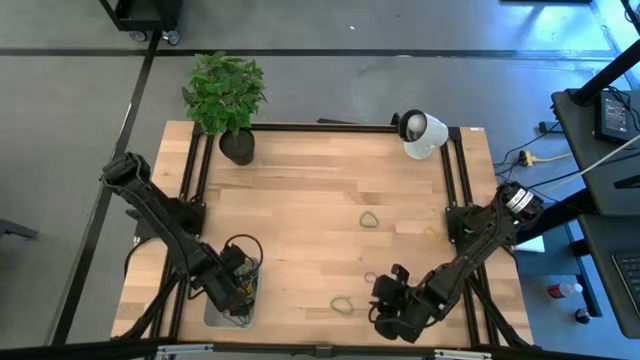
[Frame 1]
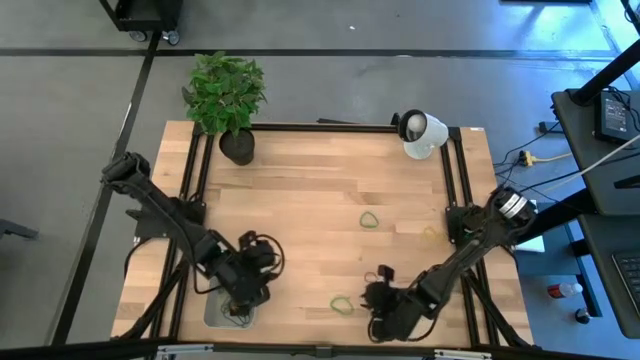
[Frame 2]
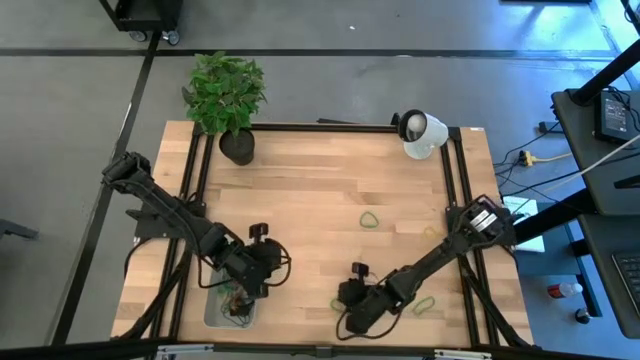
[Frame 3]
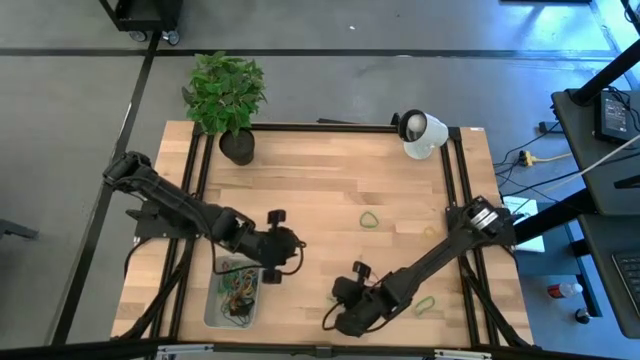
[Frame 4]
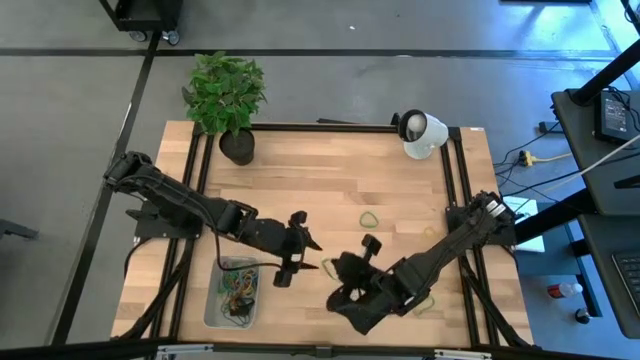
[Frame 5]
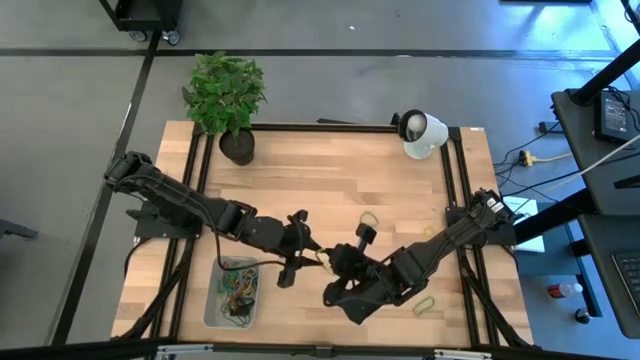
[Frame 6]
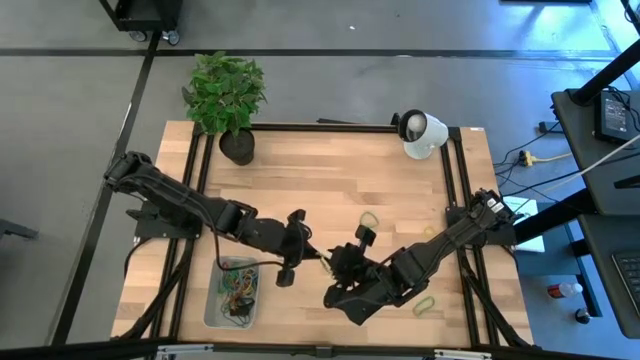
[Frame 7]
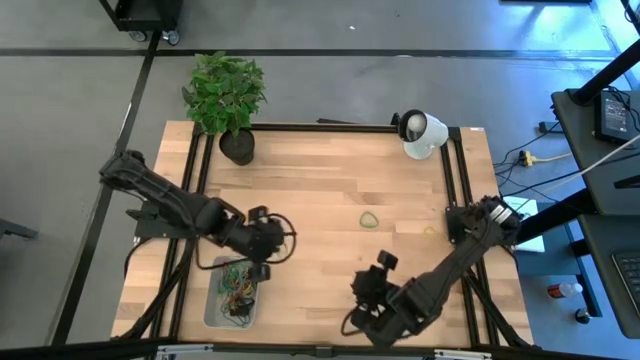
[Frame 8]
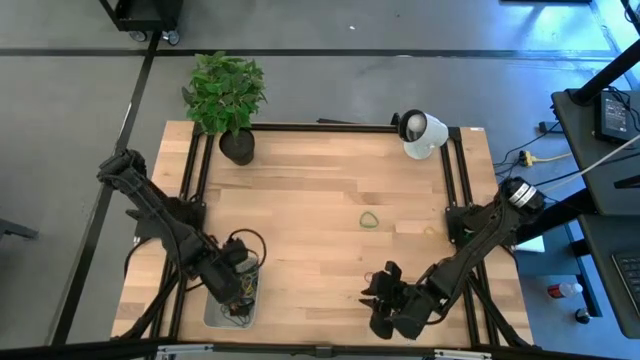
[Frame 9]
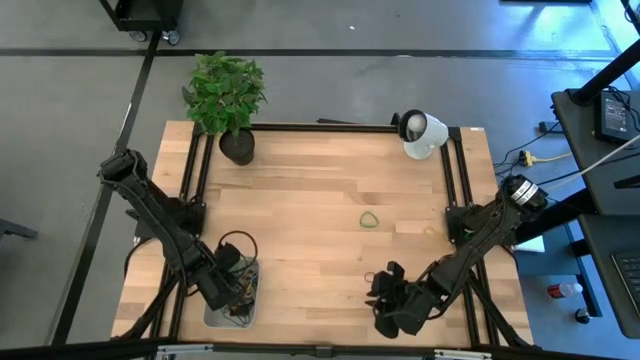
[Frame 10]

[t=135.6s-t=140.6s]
Task: Pick and place rubber bands into bin
Put the green rubber band into the bin

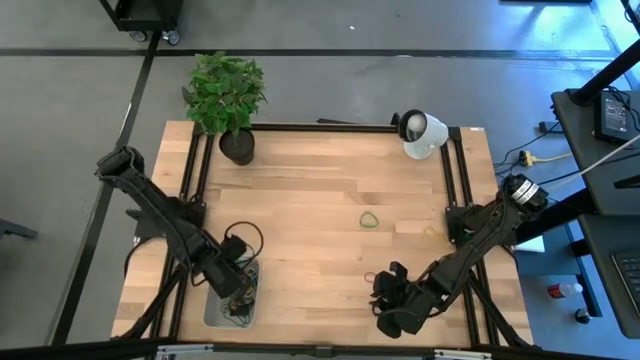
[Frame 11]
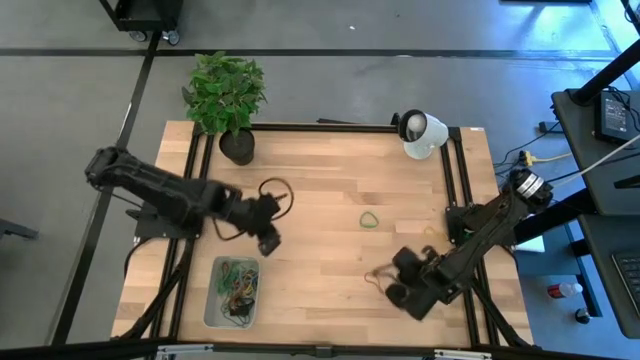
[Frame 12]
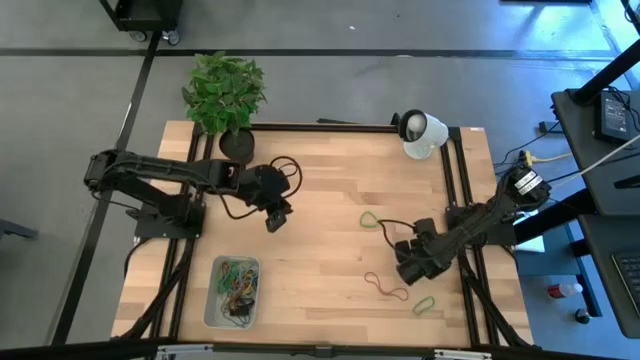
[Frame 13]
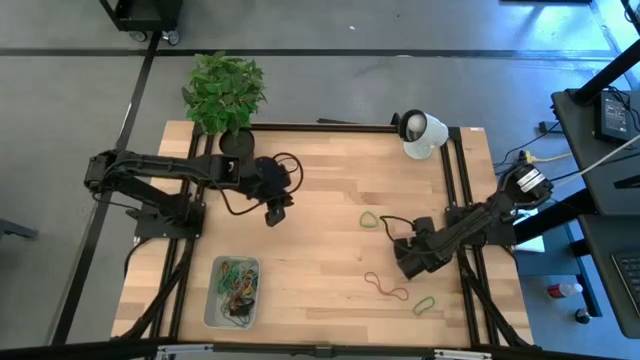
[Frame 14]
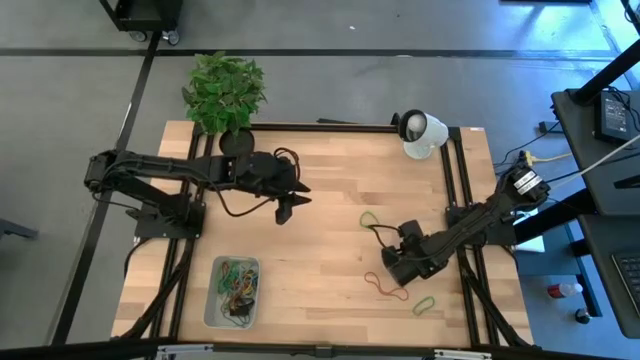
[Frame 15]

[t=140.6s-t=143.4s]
Put the yellow rubber band into the bin

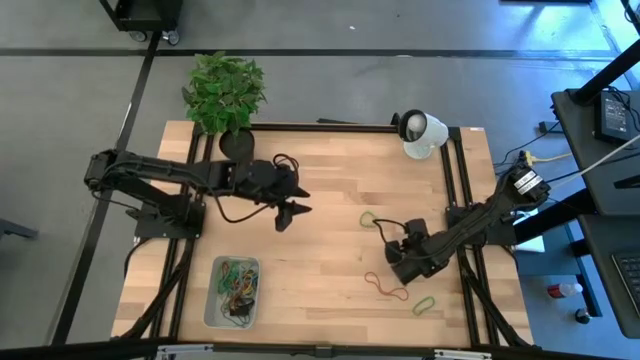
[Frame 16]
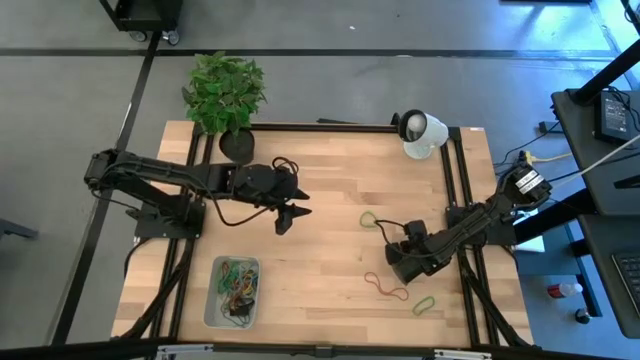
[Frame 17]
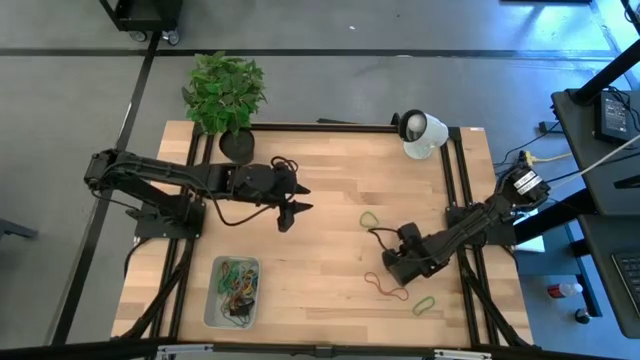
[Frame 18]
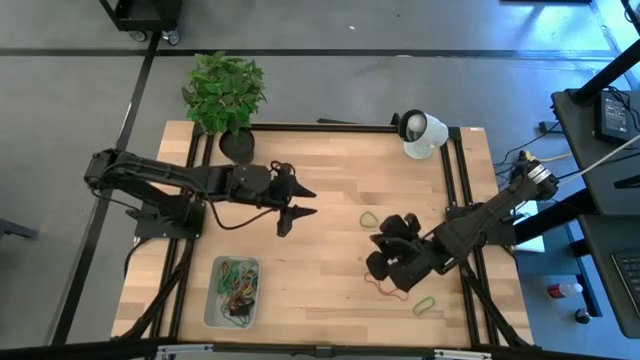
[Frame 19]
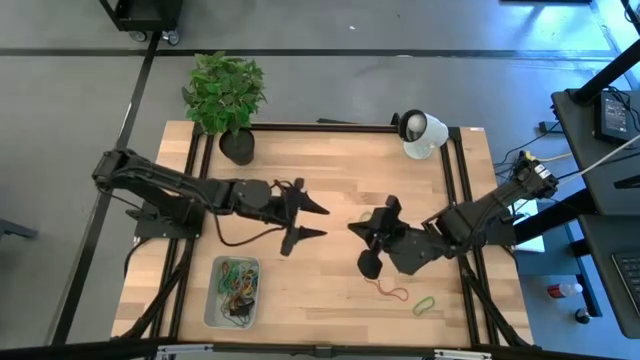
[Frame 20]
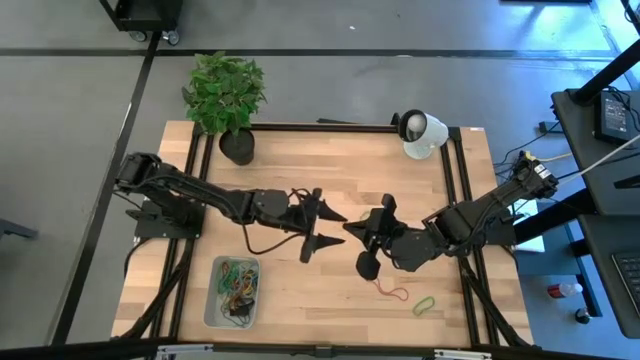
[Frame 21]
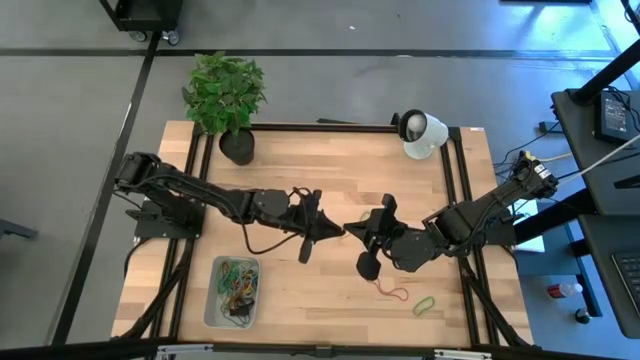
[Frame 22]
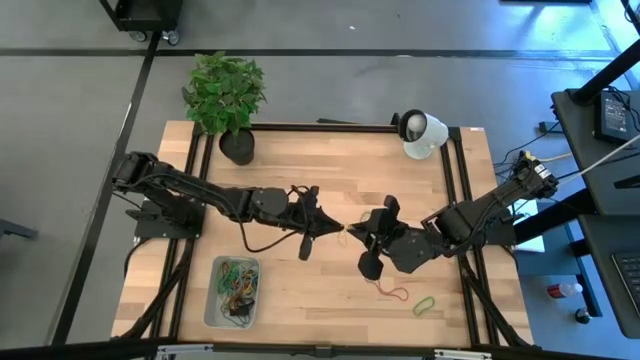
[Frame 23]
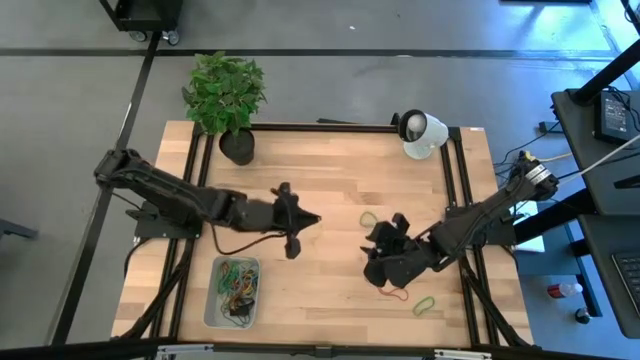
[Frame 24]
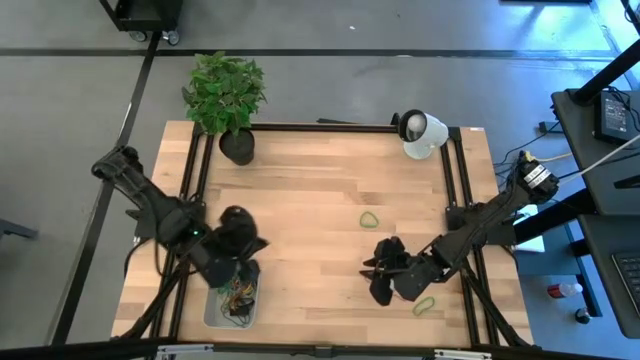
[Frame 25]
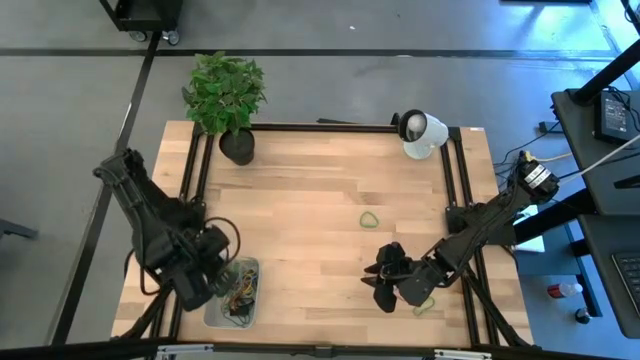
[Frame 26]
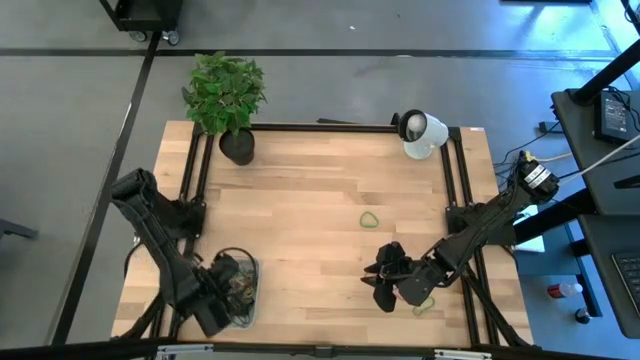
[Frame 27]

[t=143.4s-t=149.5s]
Put the yellow rubber band into the bin

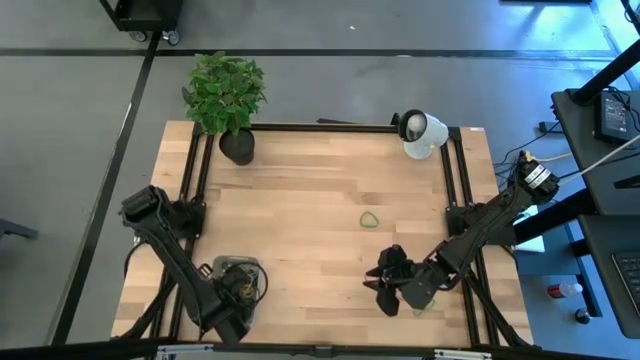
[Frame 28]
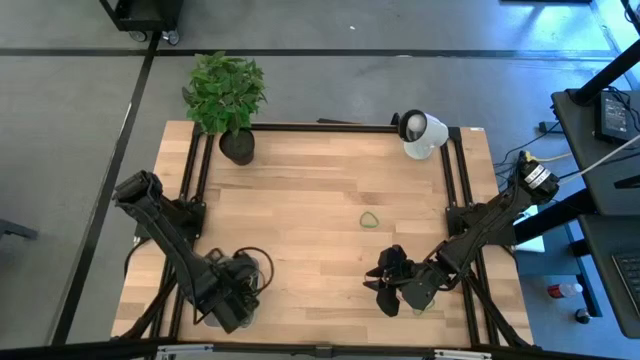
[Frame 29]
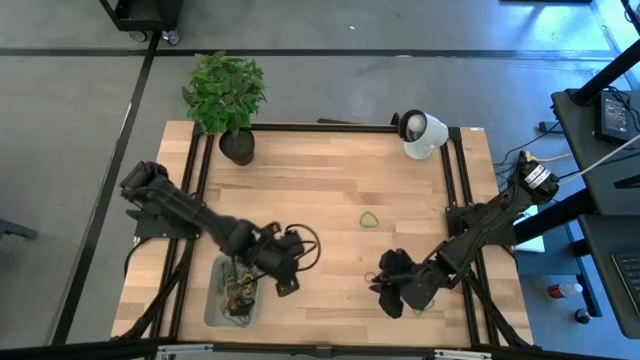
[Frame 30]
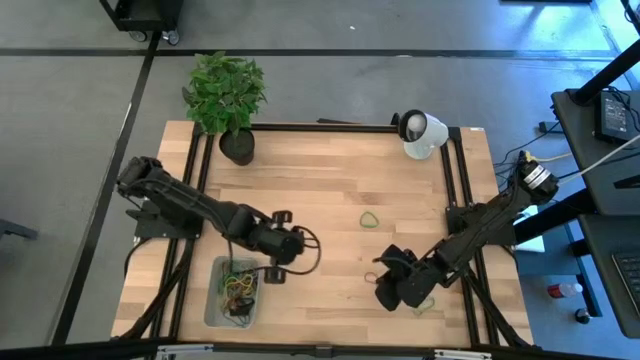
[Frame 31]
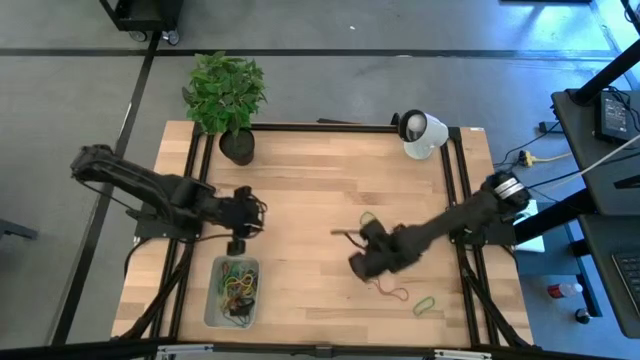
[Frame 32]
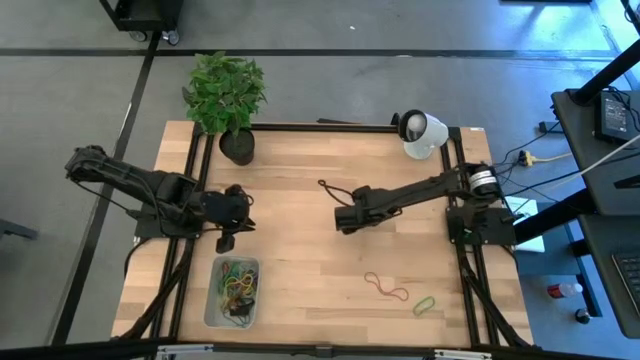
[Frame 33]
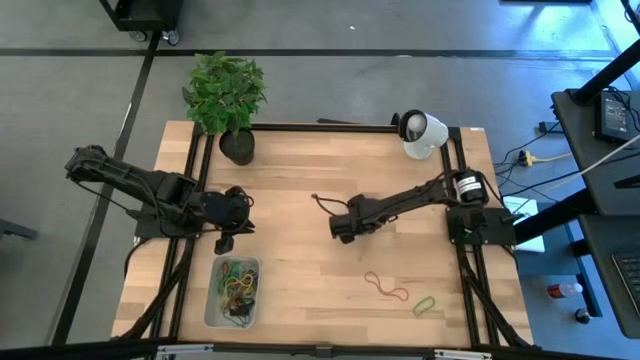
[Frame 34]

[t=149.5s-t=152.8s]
Put the green rubber band into the bin

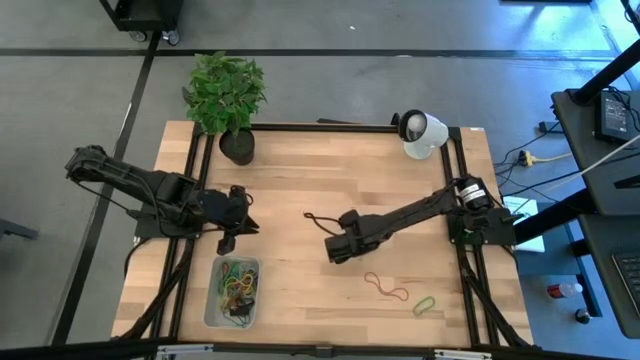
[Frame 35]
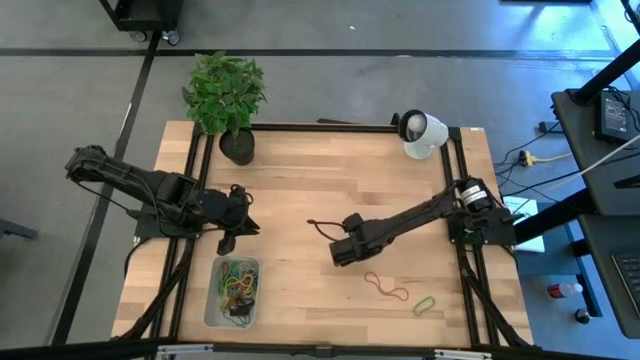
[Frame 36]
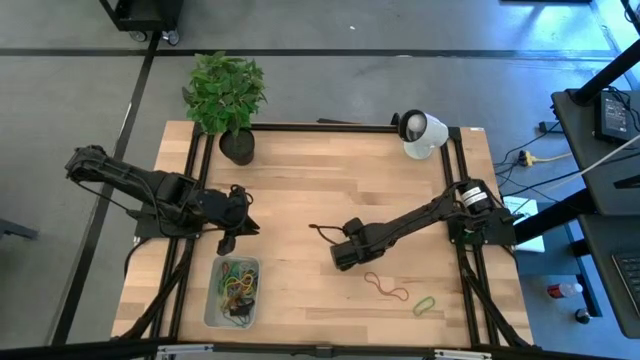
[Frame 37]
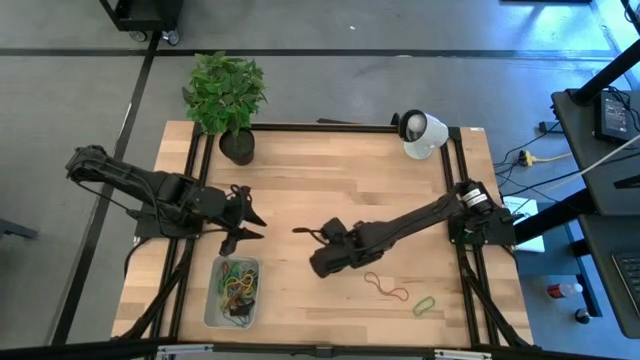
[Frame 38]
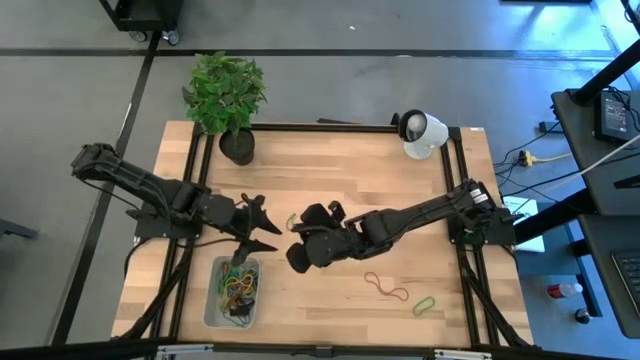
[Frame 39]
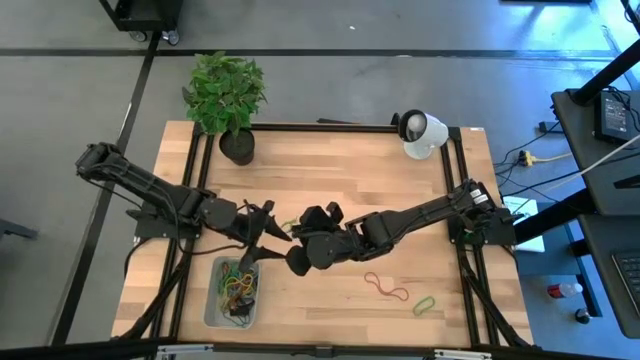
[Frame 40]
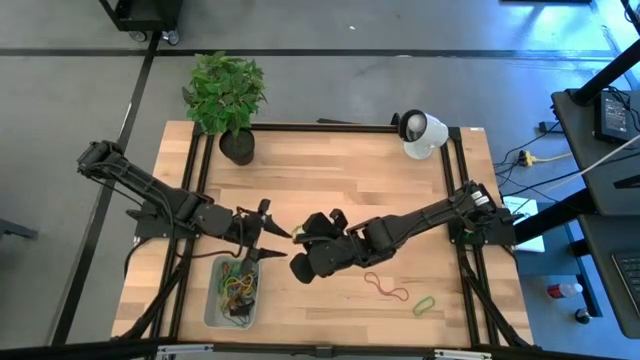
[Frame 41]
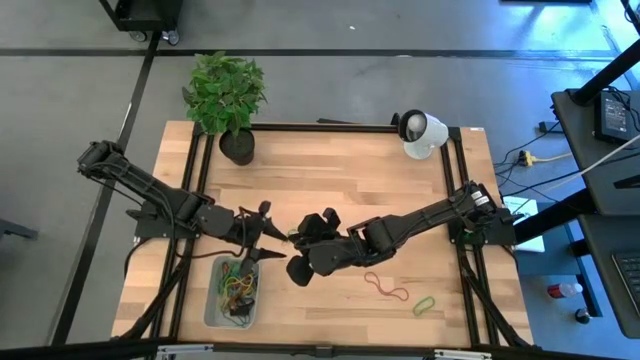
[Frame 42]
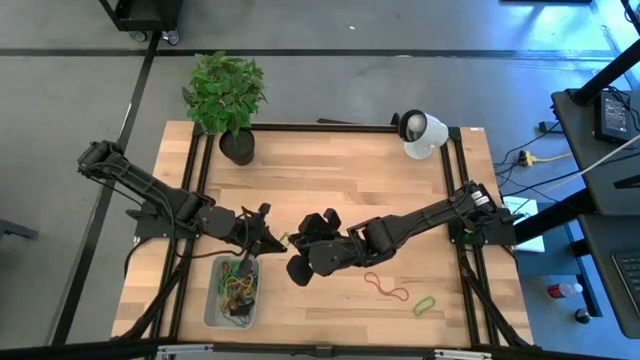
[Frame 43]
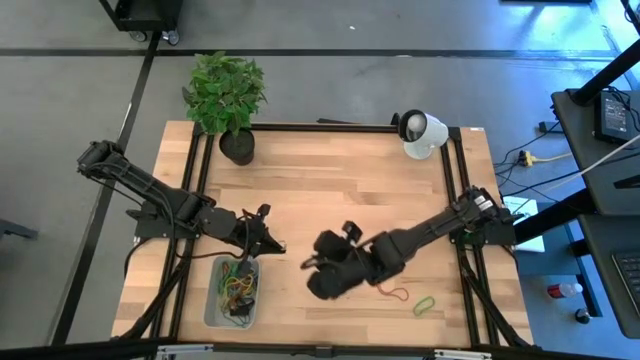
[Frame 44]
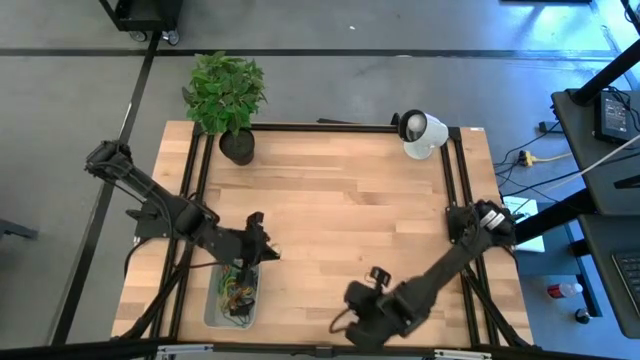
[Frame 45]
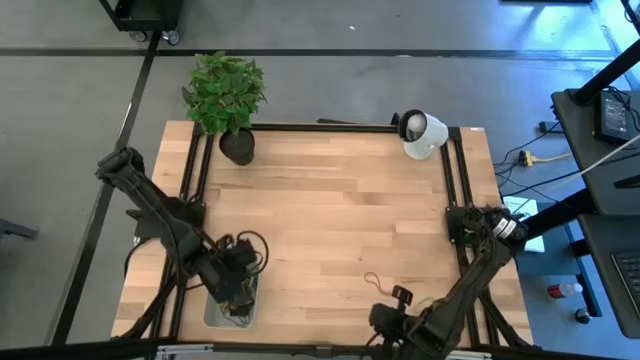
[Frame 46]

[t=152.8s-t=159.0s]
Put the green rubber band into the bin
